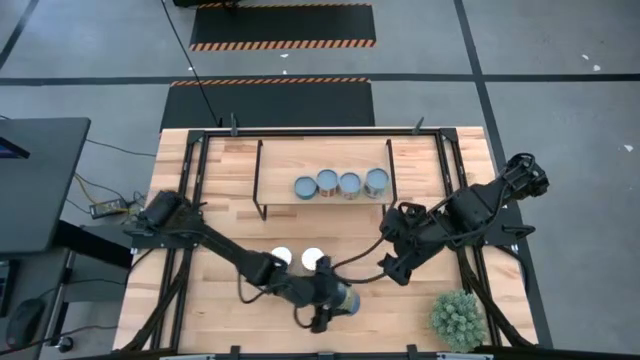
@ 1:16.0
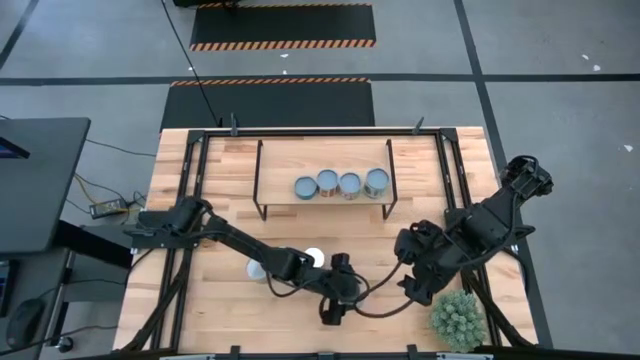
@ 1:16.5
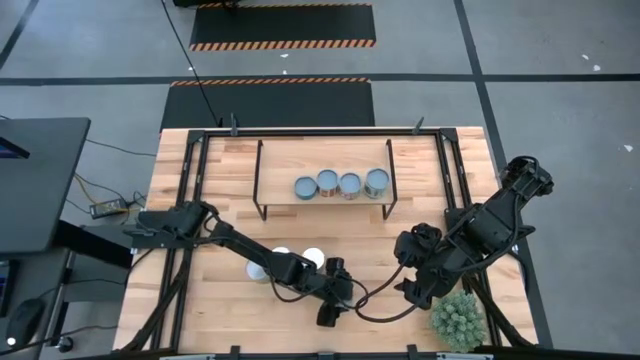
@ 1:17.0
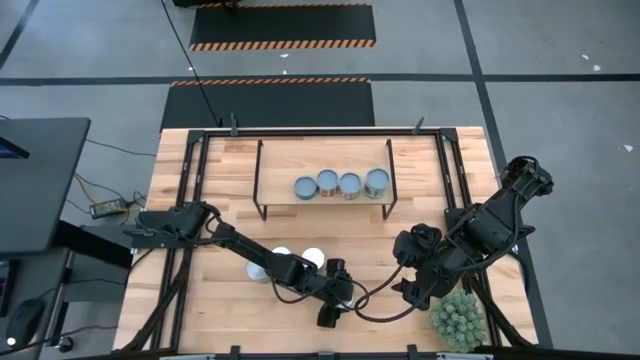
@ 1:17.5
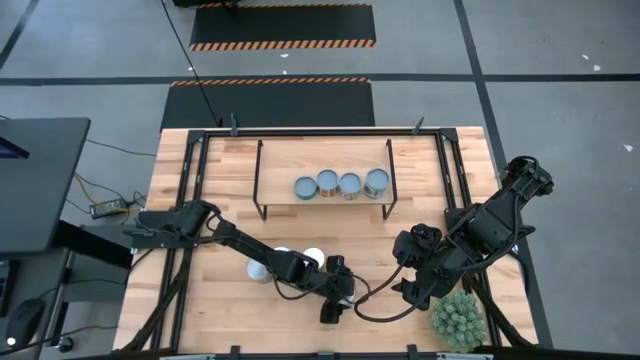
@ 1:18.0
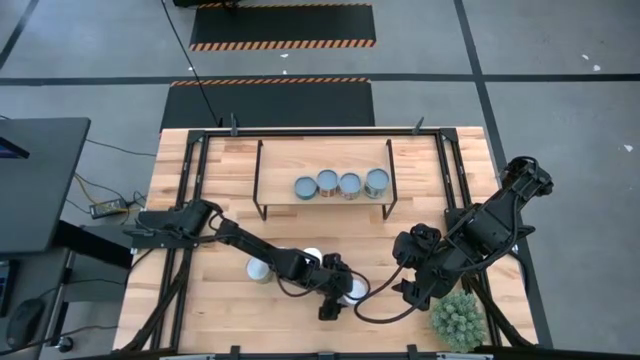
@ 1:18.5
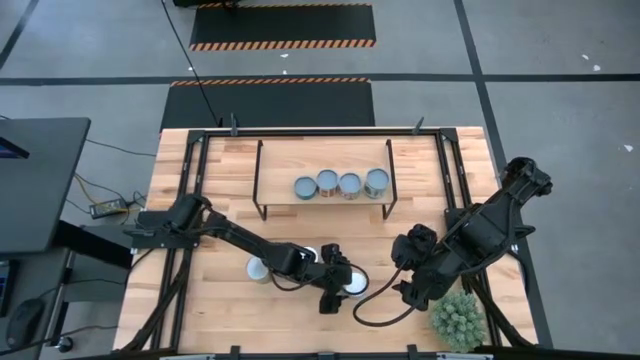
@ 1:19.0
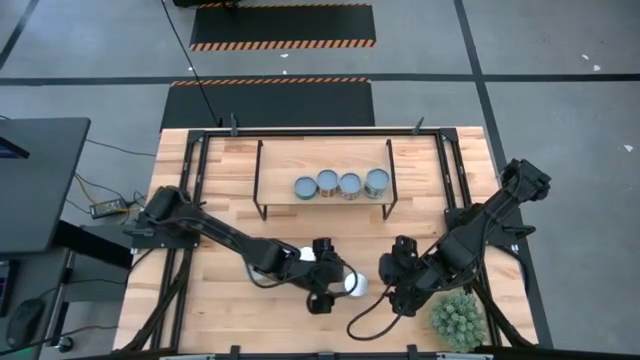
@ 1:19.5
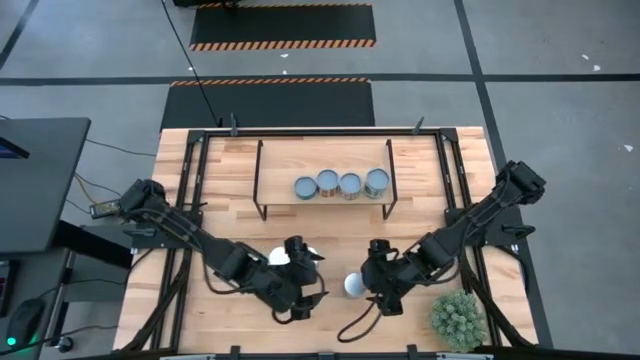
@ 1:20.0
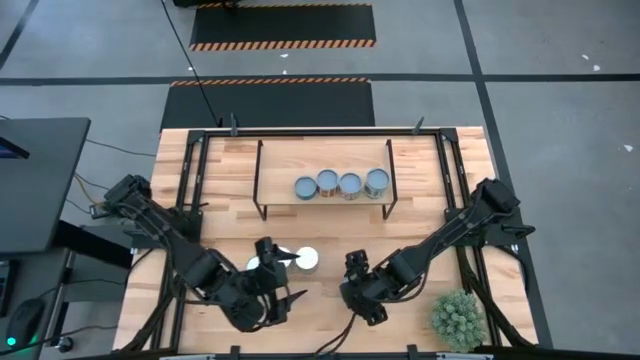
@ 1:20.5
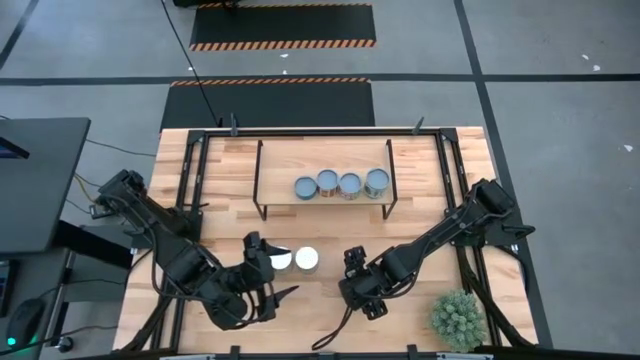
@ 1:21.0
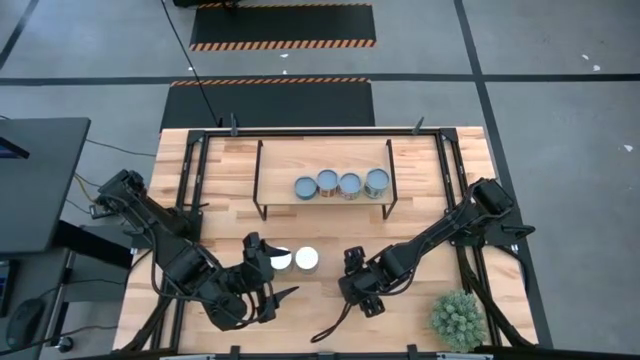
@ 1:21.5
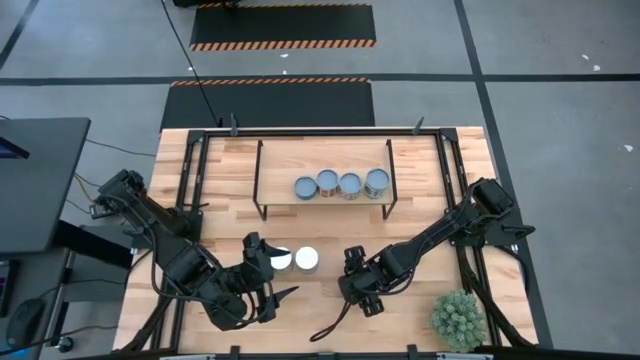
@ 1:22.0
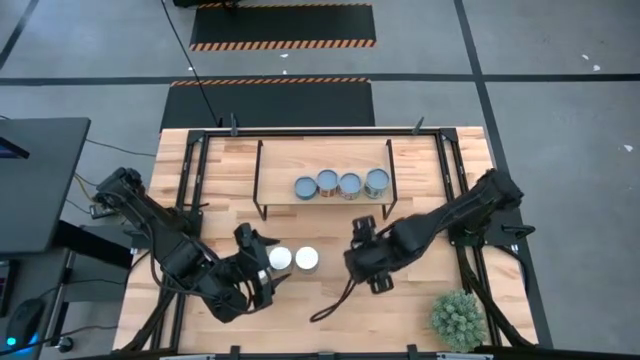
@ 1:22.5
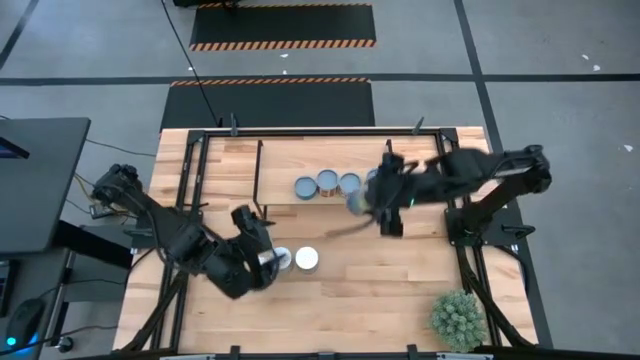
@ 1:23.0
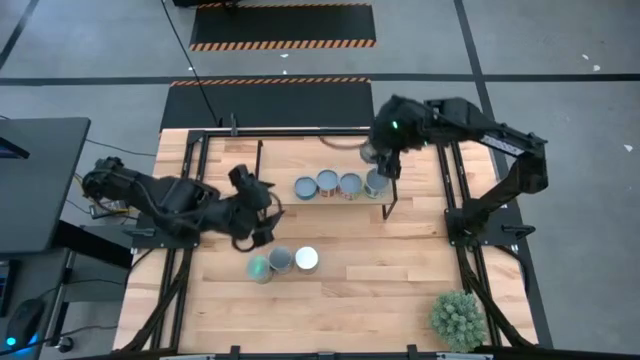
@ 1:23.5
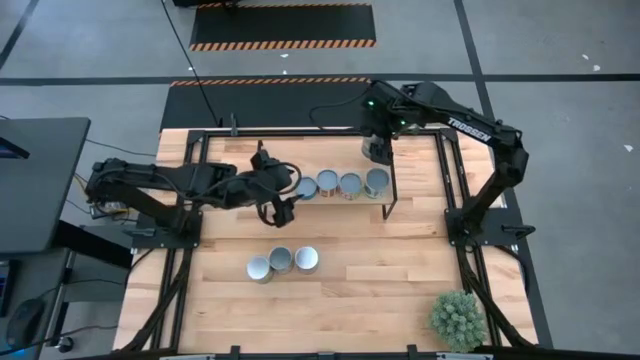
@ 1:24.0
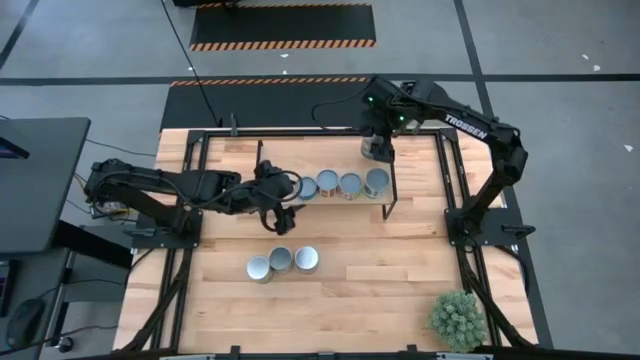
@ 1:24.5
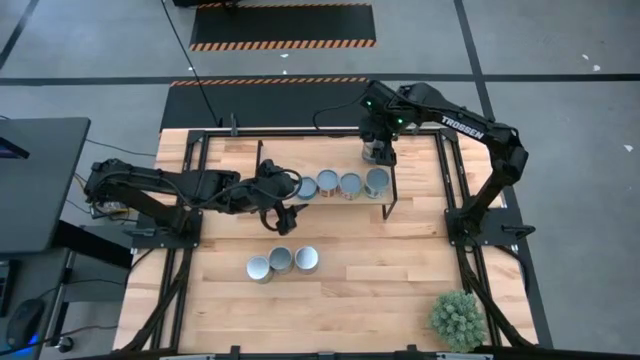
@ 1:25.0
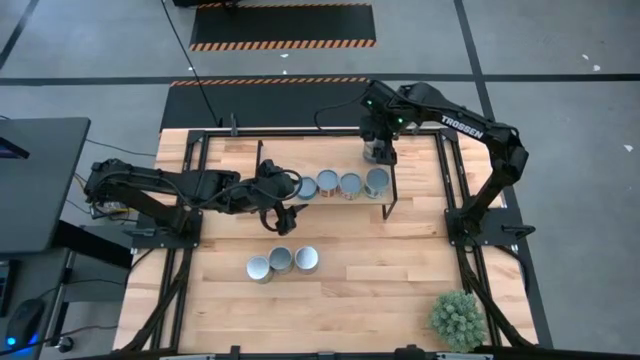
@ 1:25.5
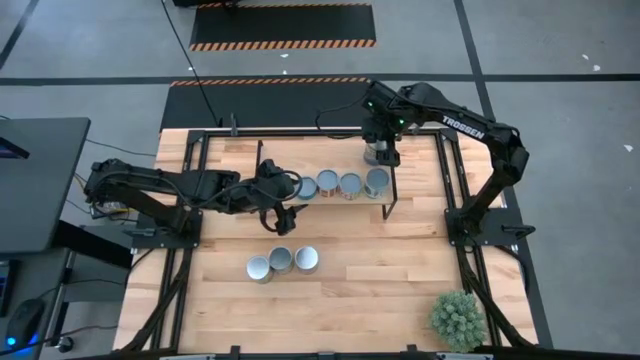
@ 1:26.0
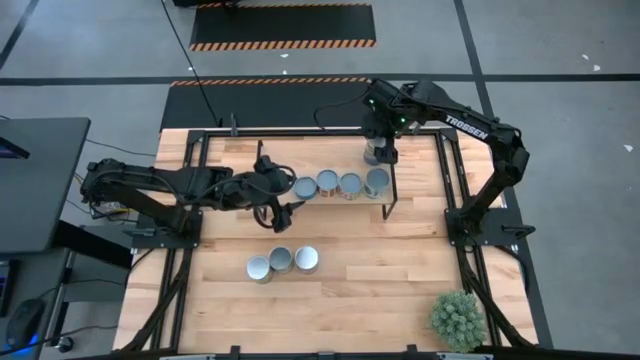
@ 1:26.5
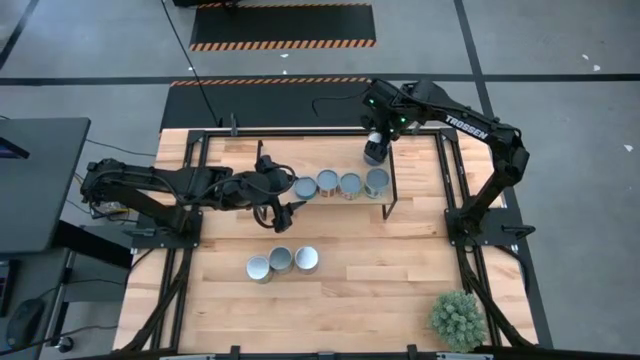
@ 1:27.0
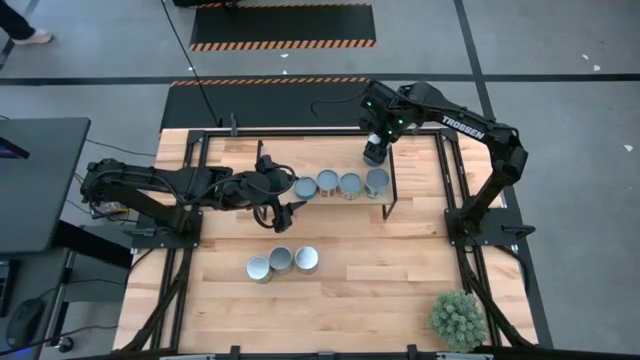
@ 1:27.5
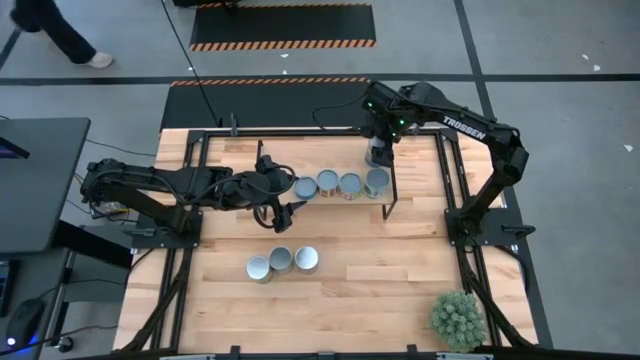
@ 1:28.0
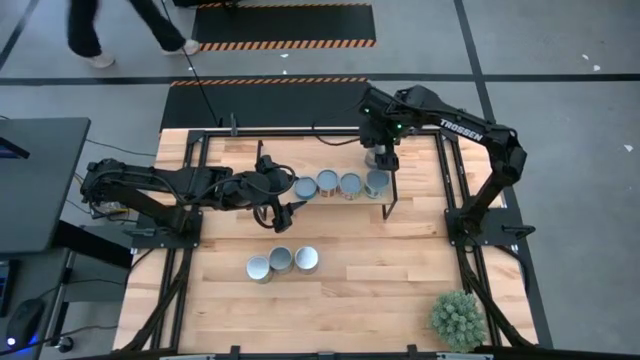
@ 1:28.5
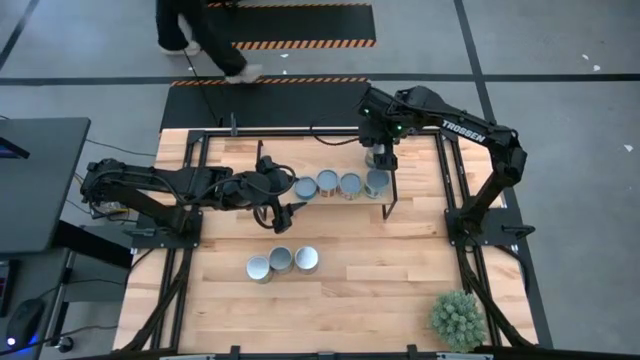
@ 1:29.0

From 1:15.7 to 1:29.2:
Task: Pick and place cans onto a shelf
Put the canned peas on the shelf

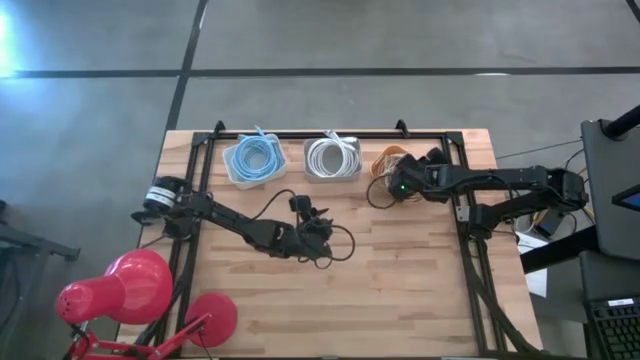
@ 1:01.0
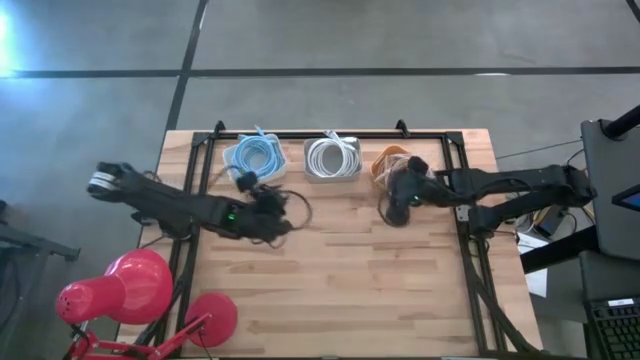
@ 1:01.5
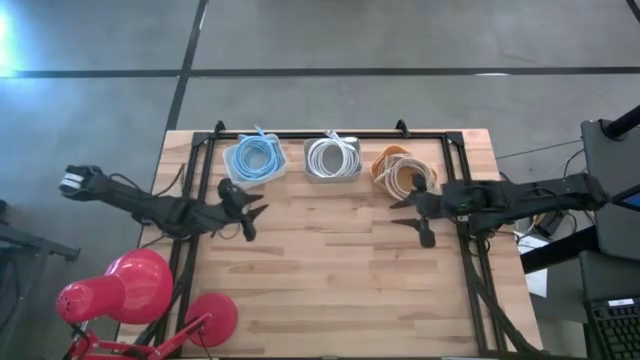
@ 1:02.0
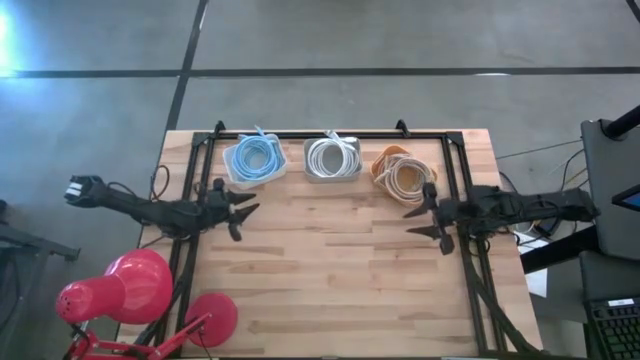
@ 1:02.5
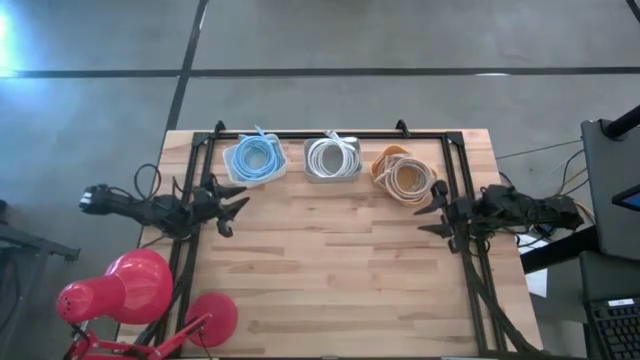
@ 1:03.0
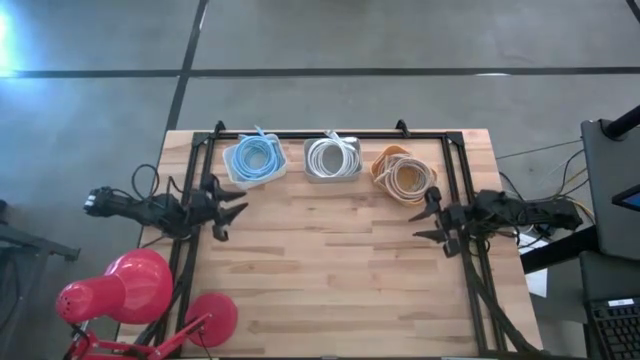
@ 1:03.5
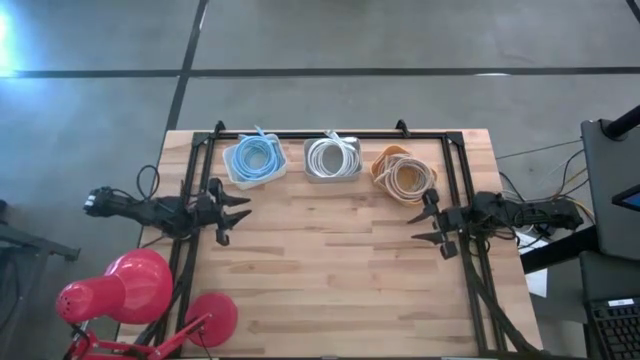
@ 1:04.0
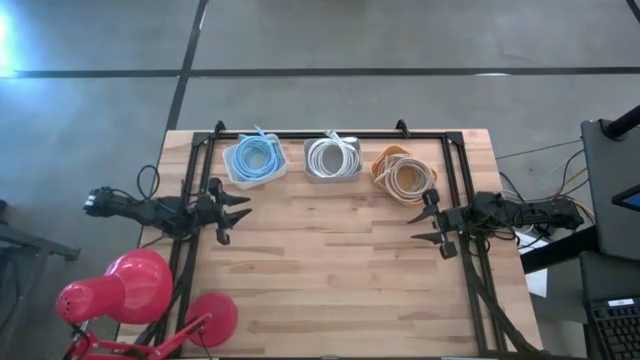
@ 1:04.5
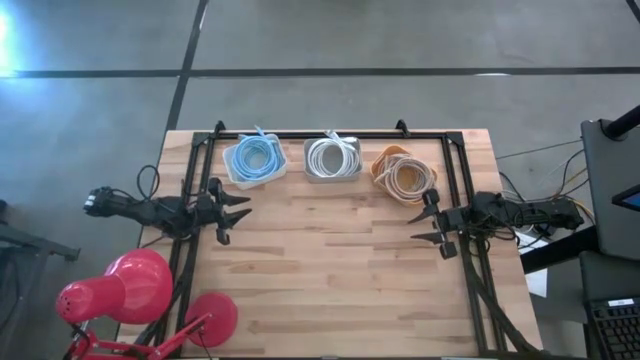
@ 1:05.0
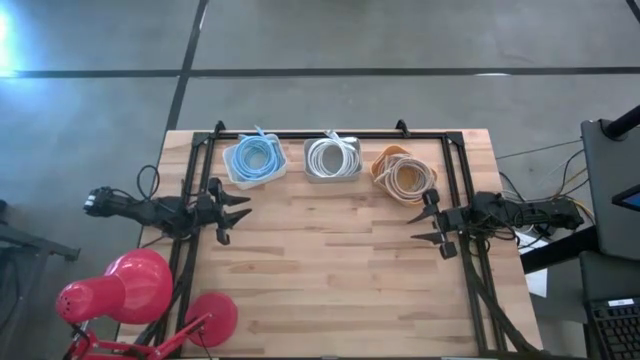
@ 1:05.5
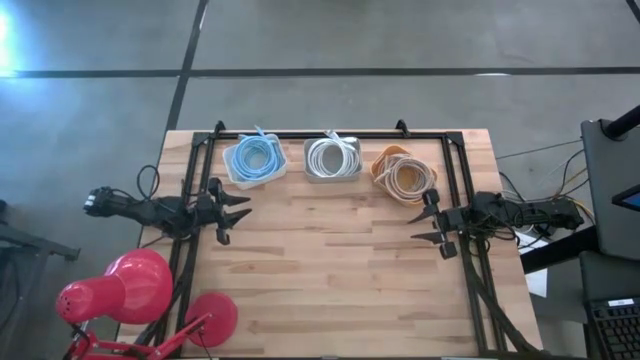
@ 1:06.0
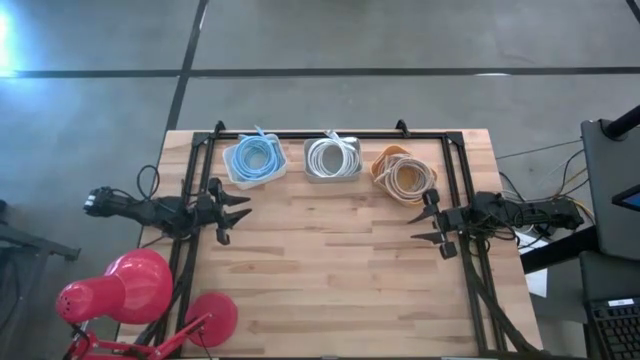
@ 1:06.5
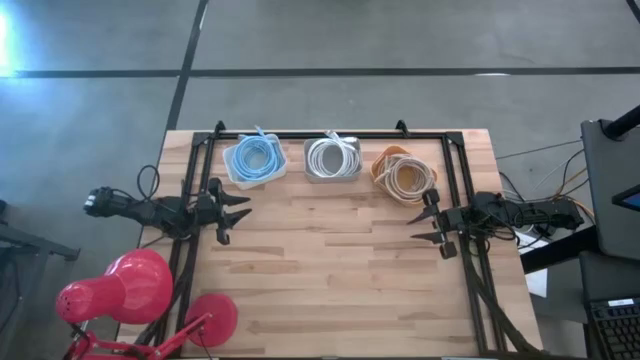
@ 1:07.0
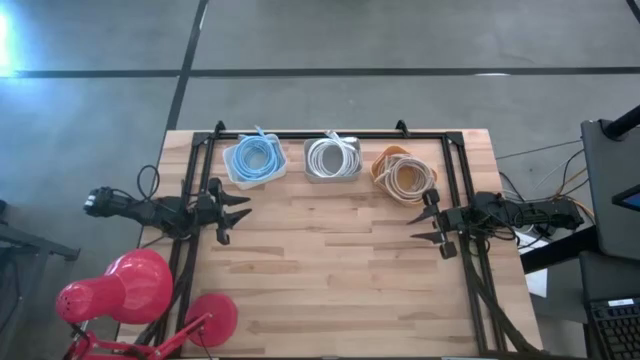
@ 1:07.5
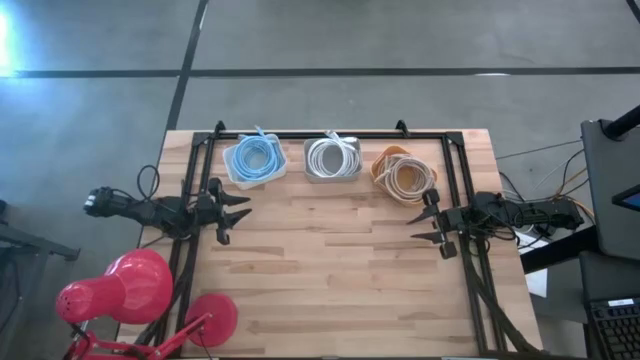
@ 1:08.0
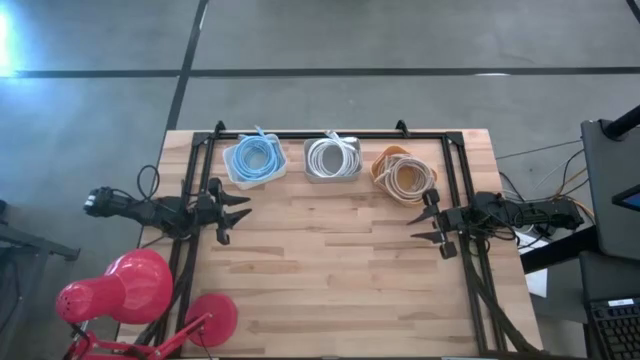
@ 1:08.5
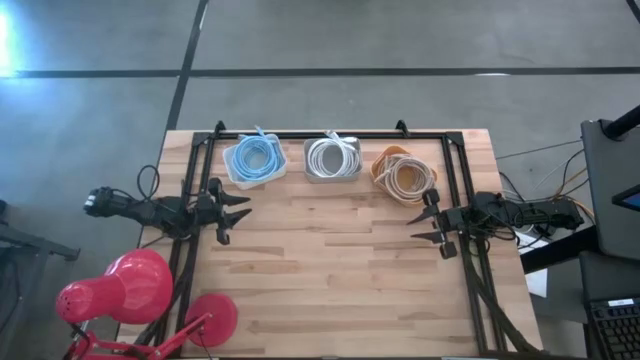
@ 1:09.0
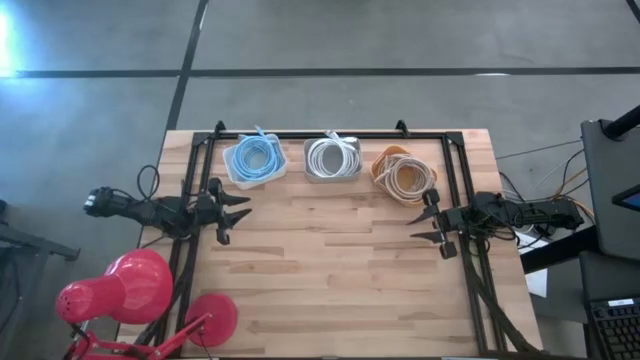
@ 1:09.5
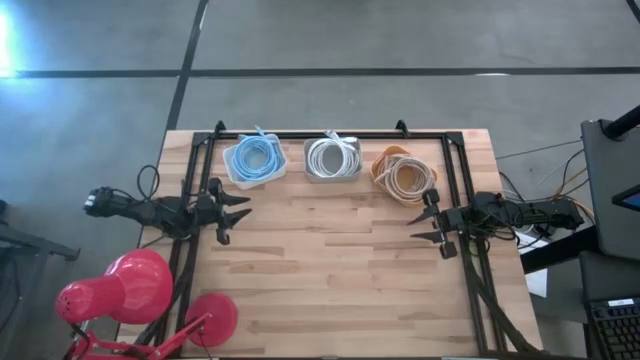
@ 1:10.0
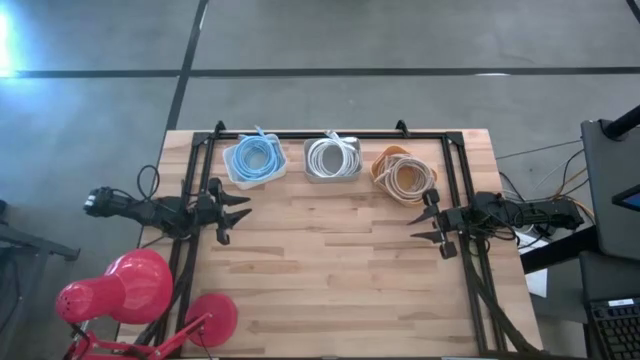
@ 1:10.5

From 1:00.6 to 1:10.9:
Task: Pick & Place USB Port
Return to Home Position
